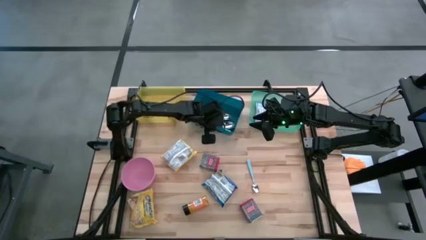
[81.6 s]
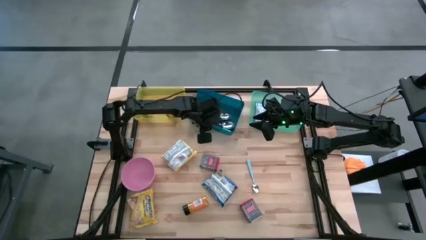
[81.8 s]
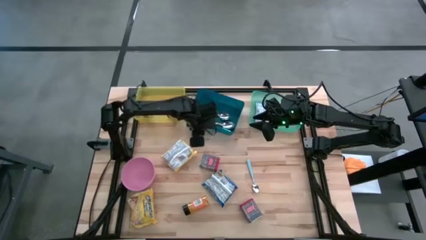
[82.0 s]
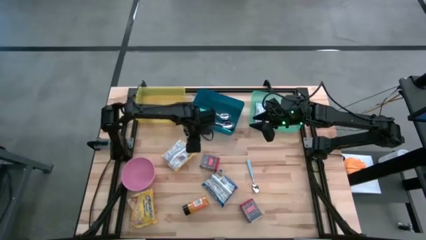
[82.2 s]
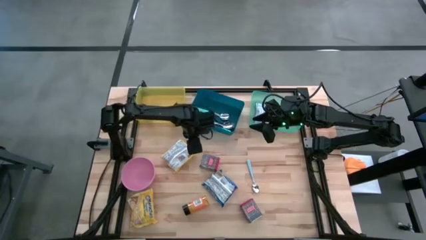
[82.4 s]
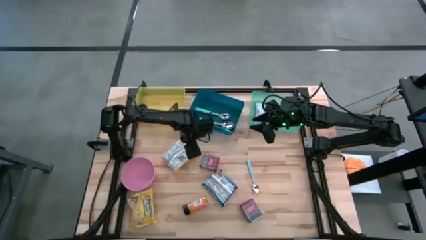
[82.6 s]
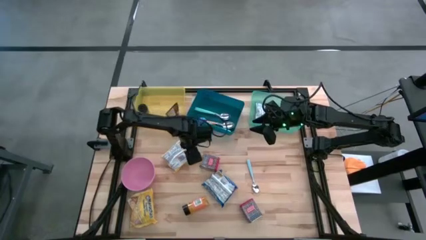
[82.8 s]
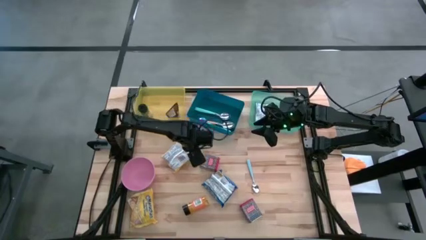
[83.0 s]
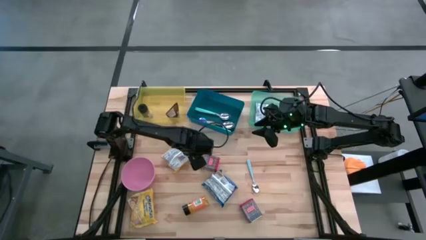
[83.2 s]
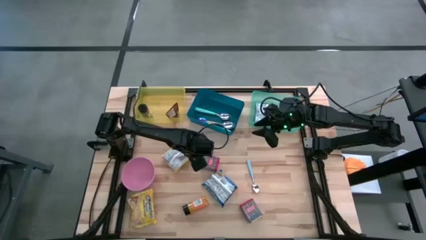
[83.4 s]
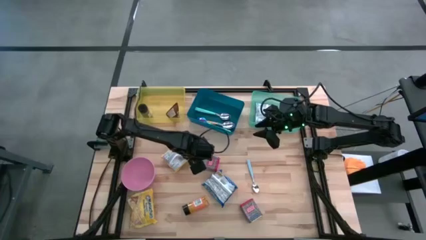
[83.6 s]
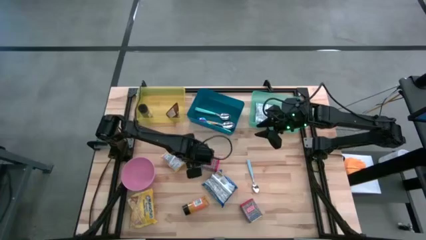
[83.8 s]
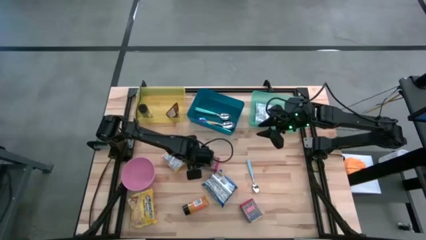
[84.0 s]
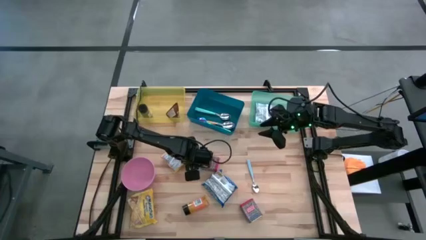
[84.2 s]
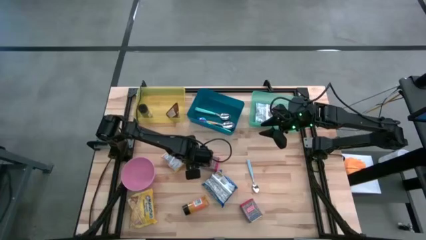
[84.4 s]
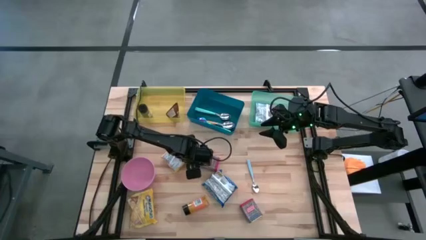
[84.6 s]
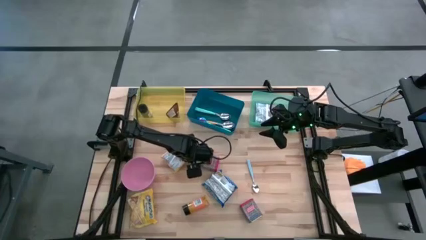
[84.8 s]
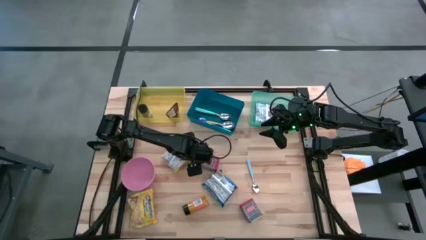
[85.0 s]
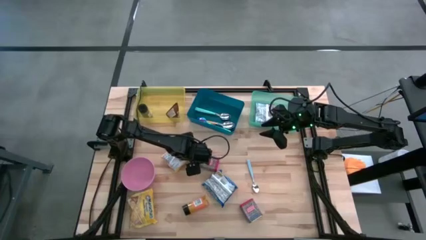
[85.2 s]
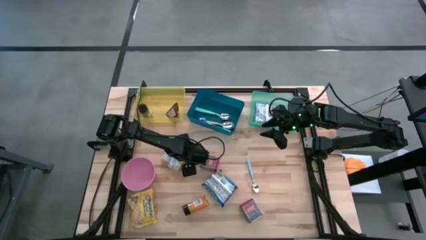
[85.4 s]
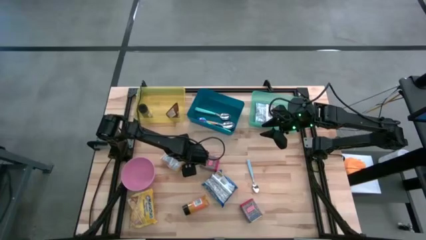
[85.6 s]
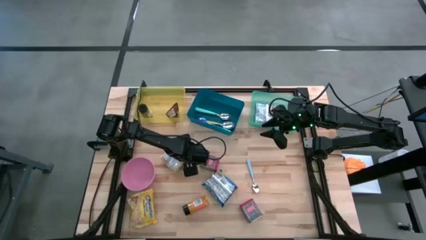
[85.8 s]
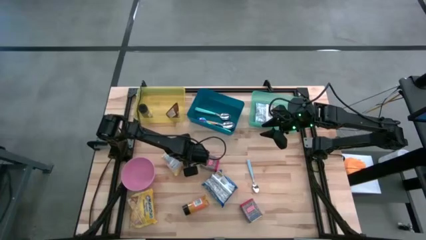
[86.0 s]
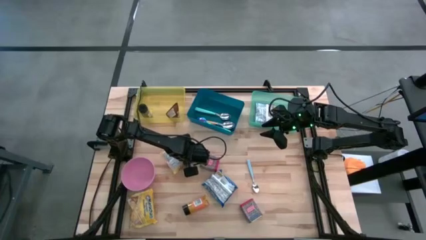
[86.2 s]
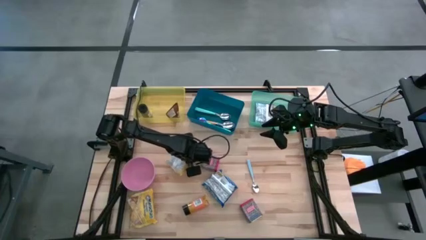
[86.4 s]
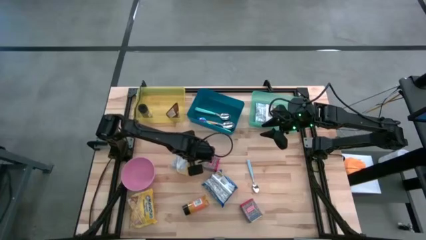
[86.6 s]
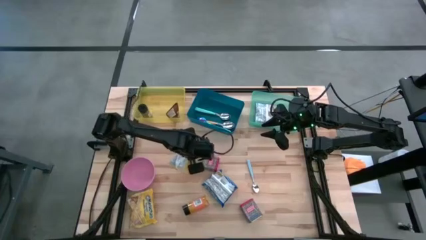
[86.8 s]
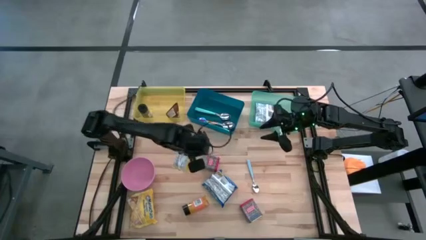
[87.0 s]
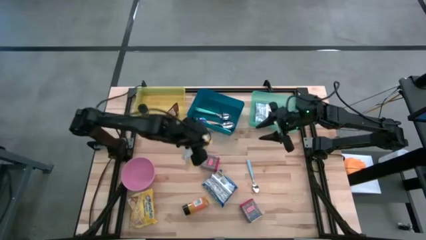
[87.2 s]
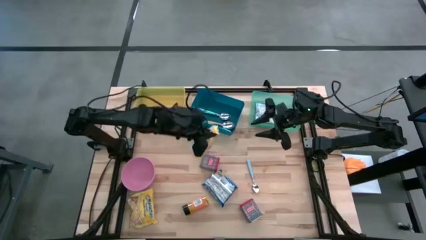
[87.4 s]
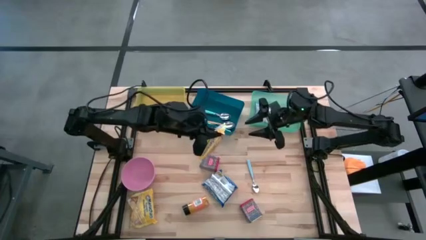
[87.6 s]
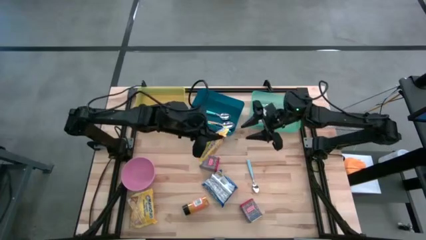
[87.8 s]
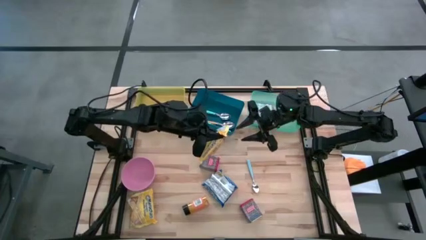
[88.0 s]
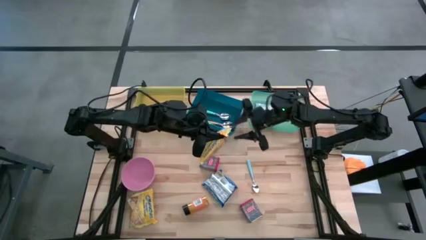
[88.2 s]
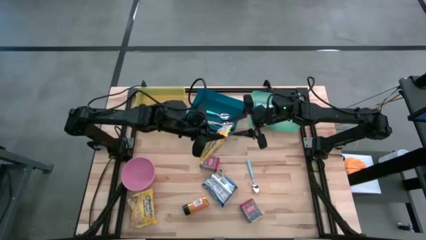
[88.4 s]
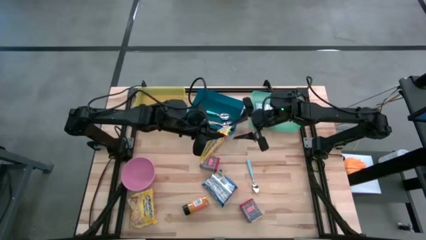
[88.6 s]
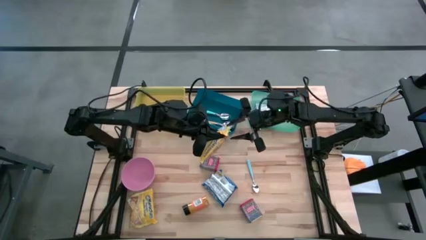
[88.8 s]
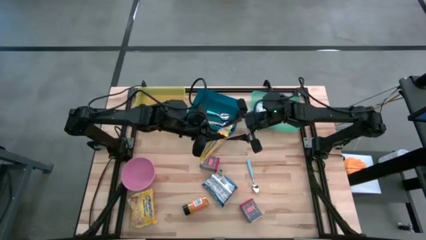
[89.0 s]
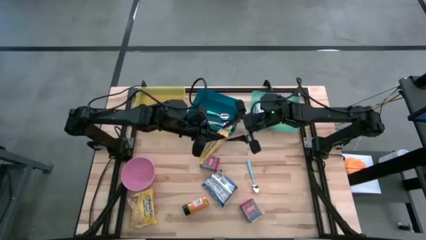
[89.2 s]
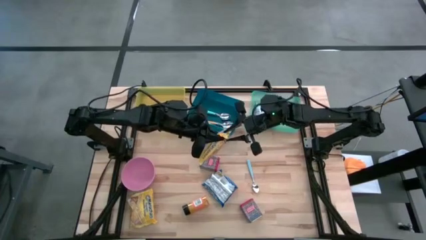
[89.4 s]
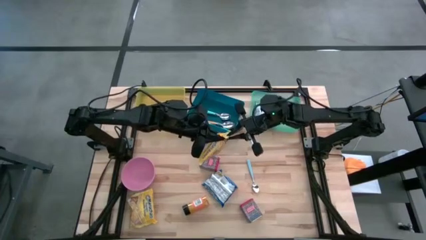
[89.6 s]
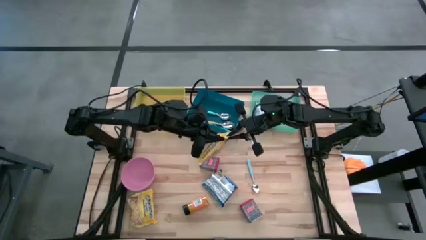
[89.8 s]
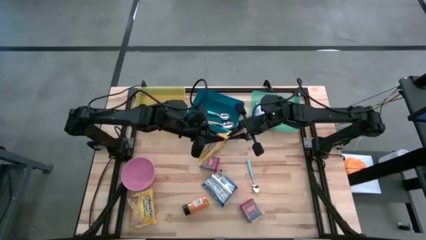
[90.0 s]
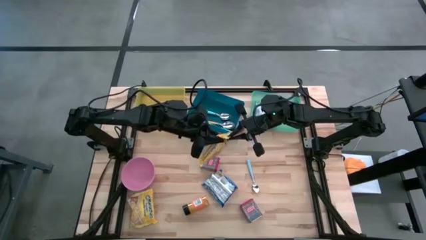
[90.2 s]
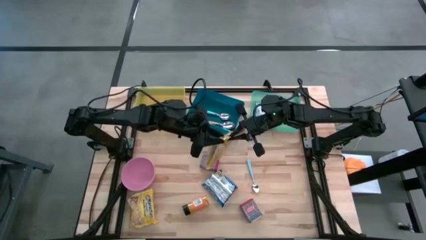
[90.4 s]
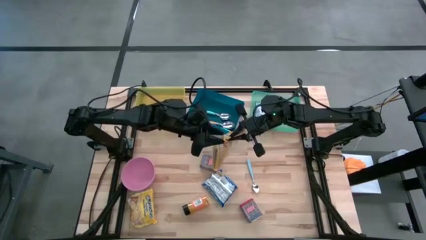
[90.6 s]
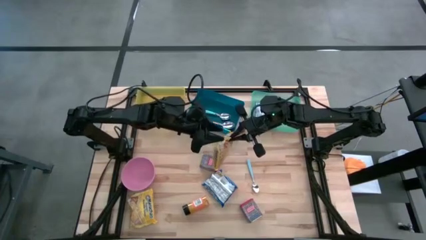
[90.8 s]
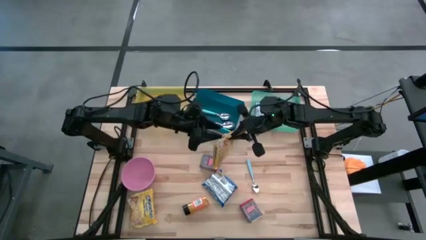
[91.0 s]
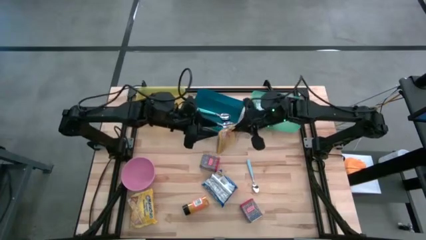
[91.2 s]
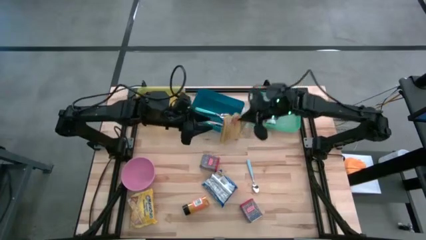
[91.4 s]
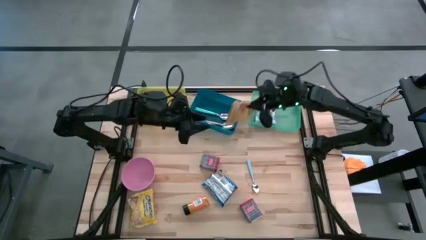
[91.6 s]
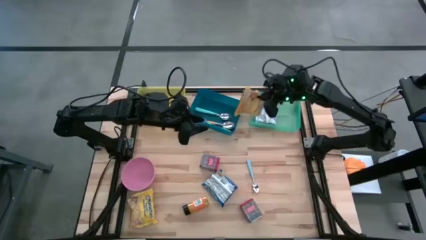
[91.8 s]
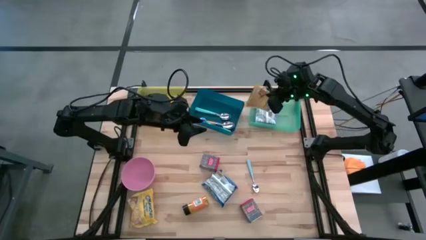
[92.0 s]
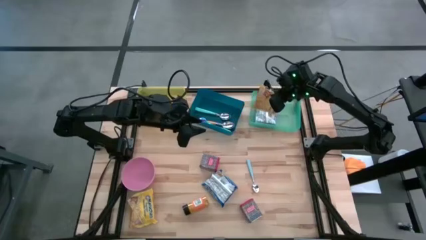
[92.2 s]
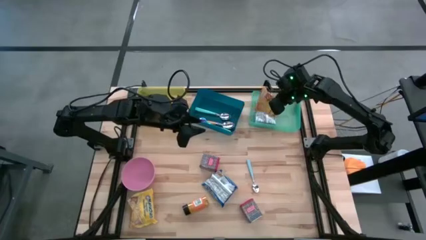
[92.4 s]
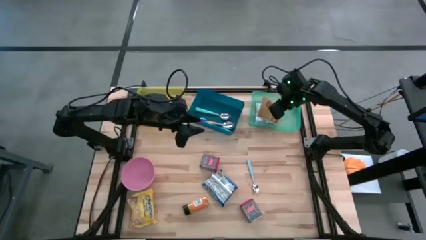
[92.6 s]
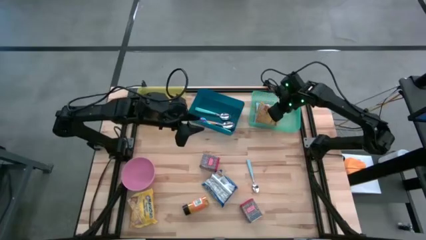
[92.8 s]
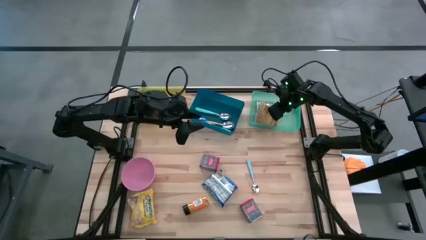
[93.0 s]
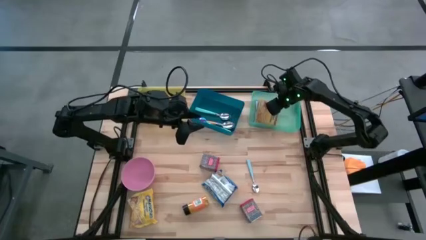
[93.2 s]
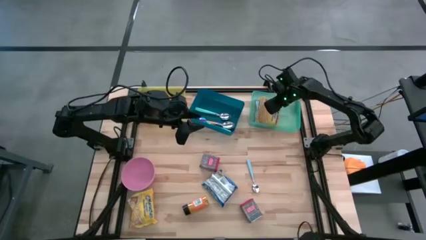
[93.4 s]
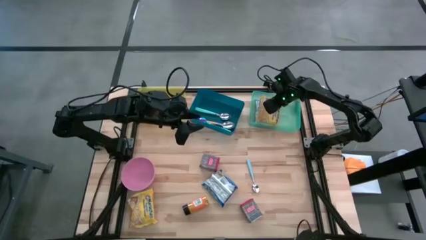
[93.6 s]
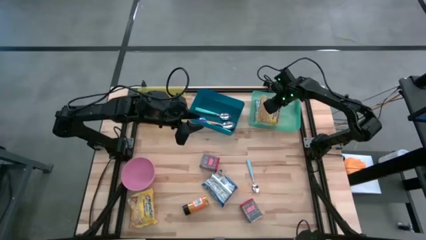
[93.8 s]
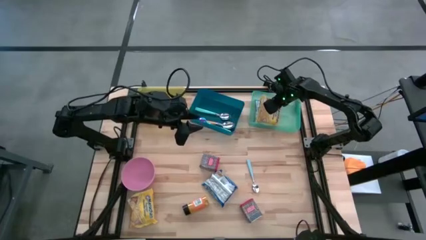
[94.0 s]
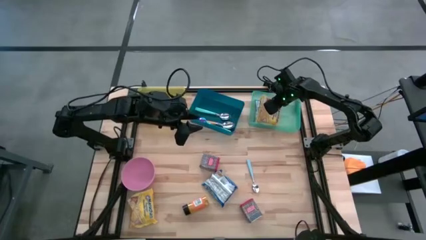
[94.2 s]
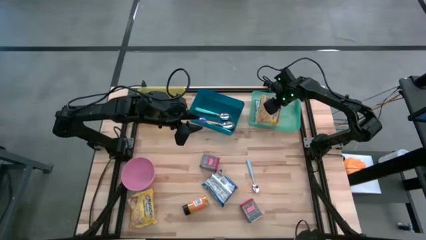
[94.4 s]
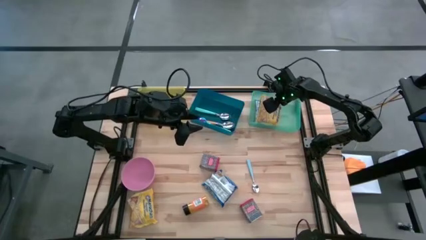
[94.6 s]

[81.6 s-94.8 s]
Put the yellow noodle pack into the green bin

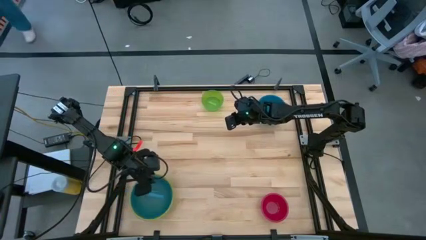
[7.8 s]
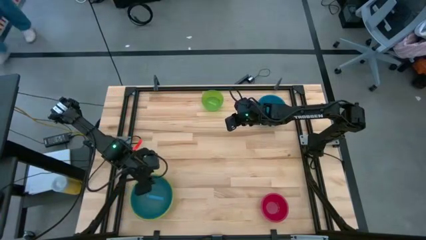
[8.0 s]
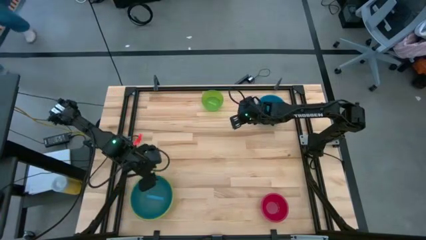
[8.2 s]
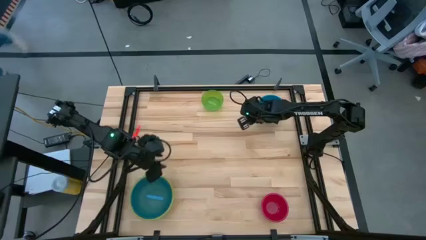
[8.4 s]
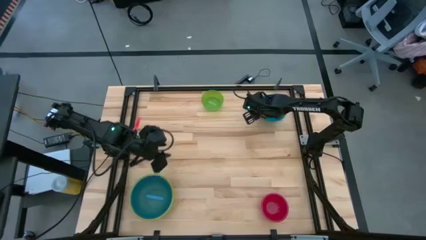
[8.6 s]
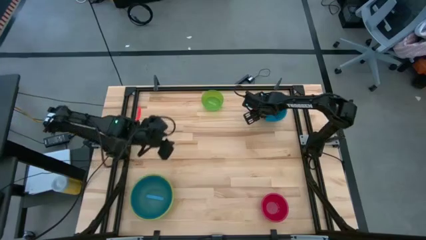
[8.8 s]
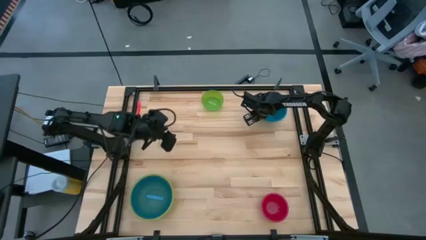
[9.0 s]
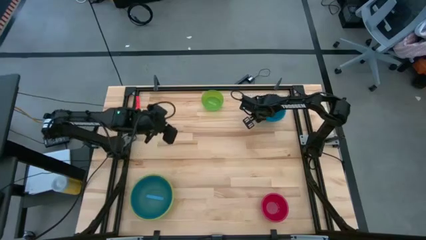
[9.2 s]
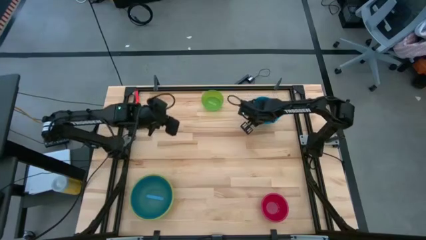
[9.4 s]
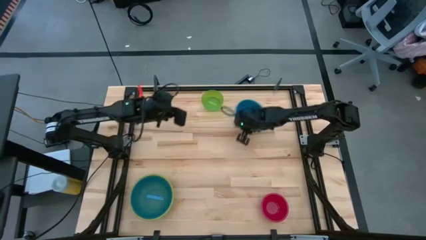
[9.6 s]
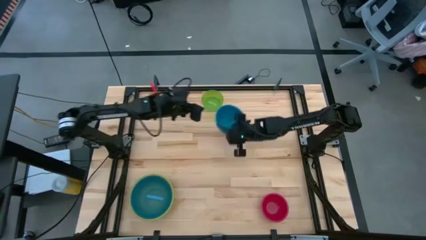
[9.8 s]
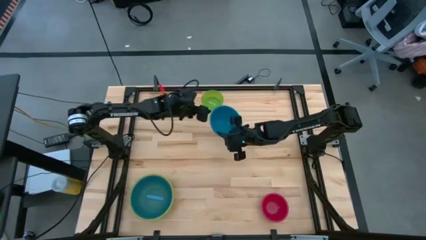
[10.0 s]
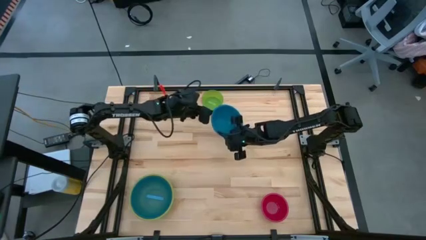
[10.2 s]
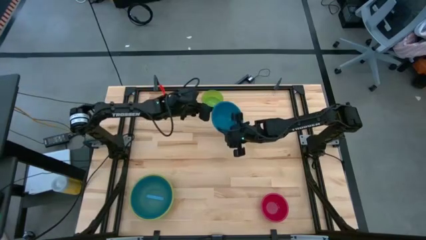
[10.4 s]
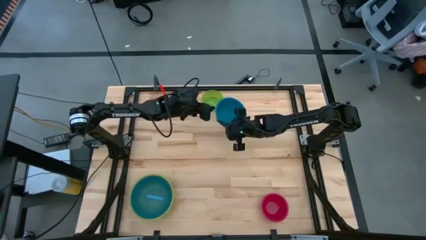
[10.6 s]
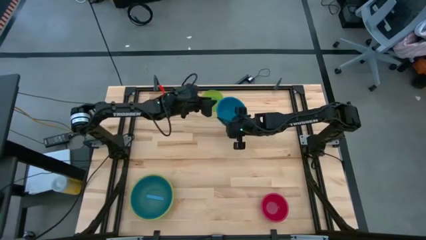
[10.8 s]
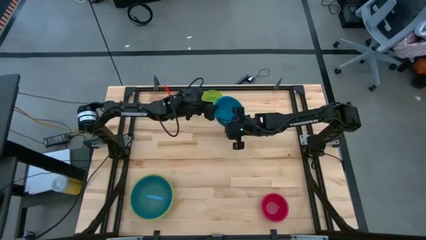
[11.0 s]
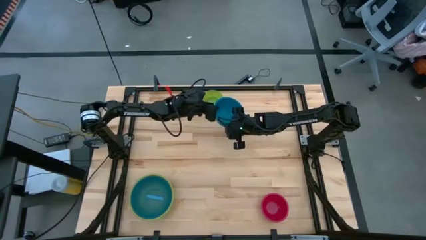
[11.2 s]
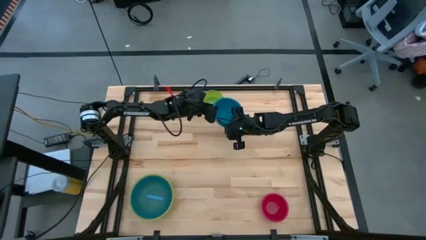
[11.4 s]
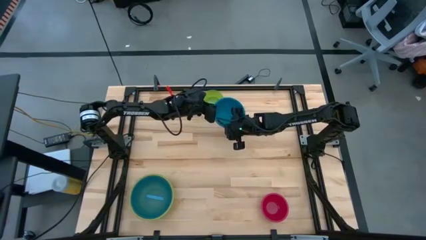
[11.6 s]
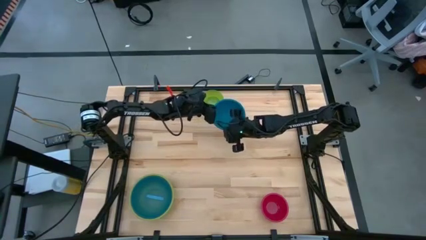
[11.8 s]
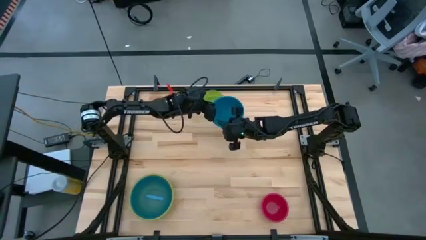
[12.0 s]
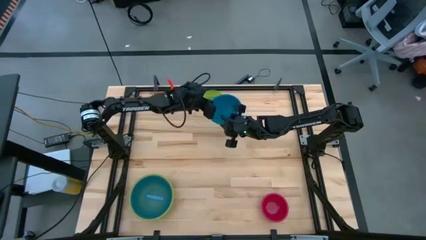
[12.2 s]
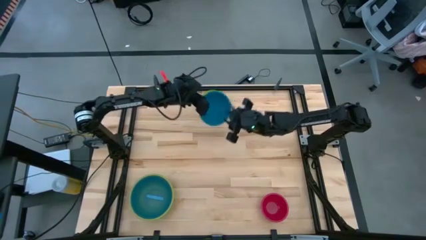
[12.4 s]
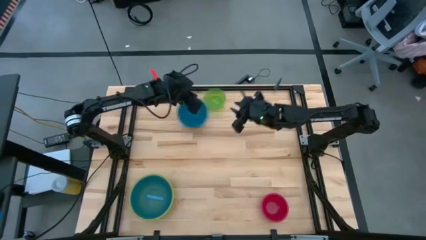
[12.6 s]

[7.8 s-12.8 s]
Stack the top blue bowl on top of the the light blue bowl
